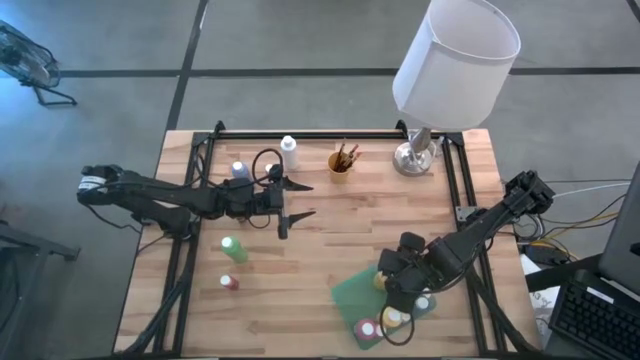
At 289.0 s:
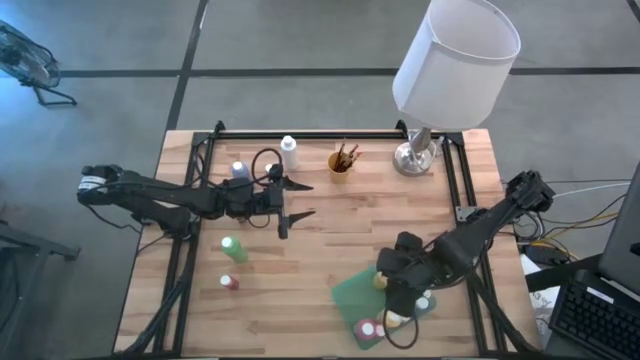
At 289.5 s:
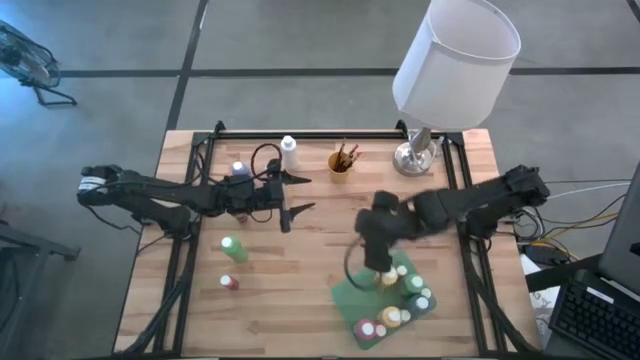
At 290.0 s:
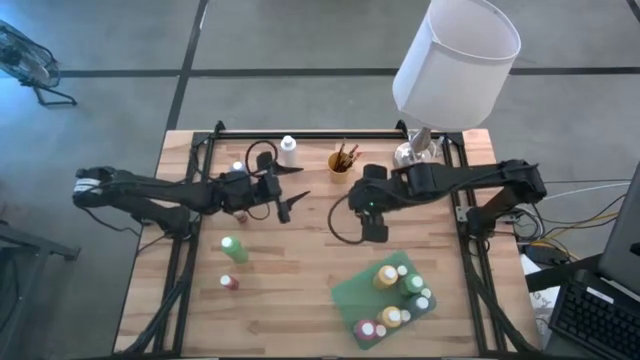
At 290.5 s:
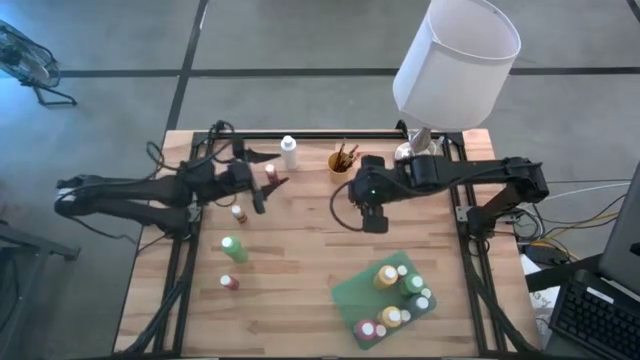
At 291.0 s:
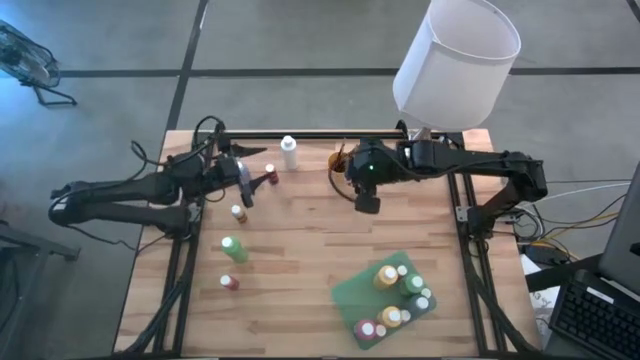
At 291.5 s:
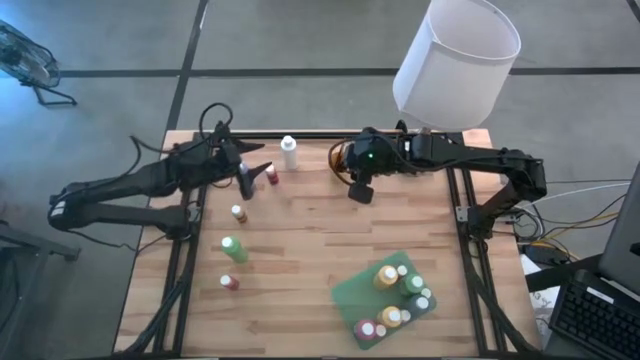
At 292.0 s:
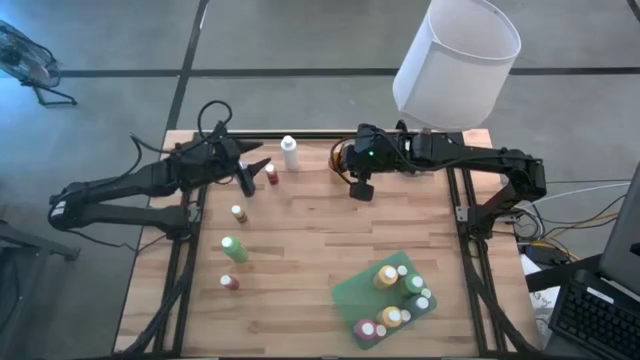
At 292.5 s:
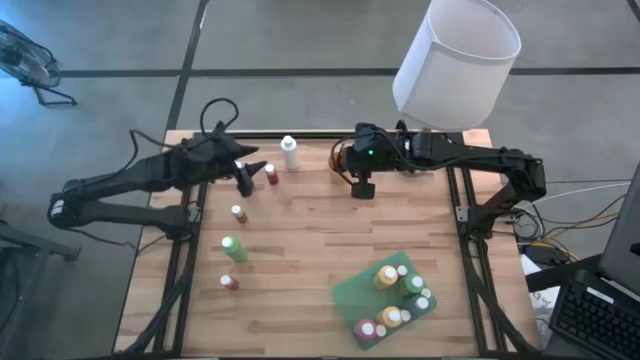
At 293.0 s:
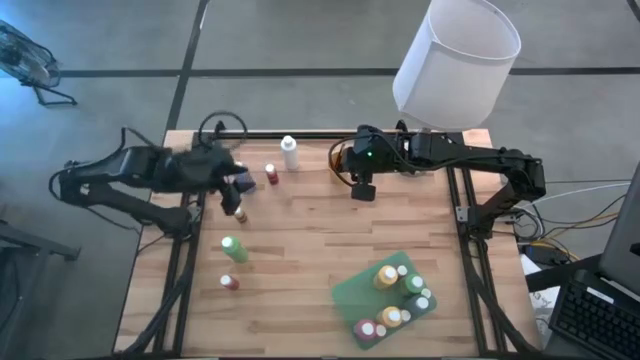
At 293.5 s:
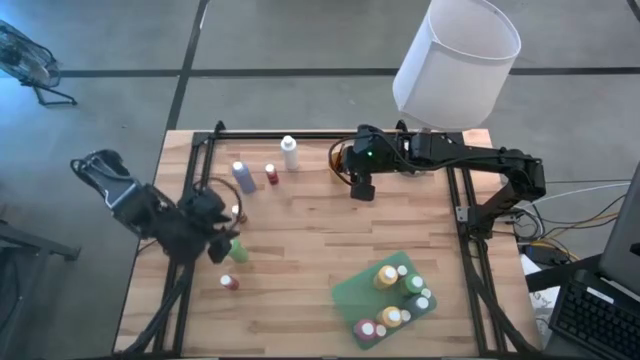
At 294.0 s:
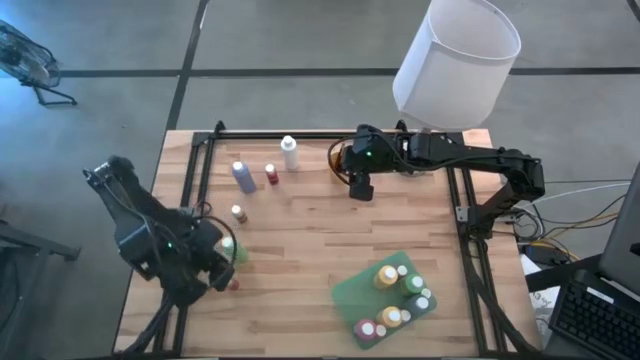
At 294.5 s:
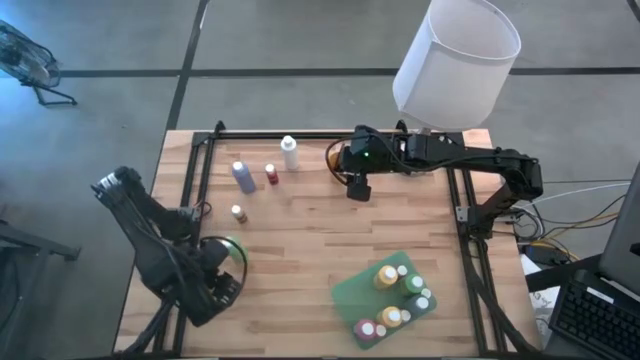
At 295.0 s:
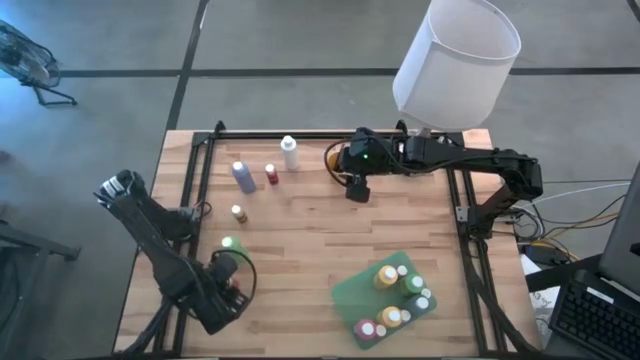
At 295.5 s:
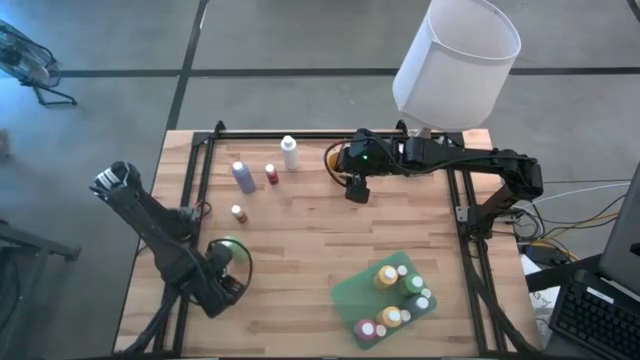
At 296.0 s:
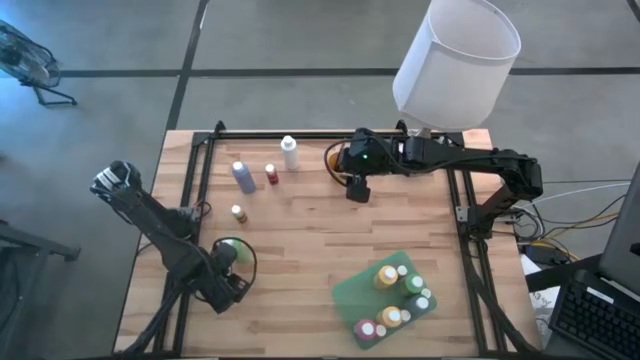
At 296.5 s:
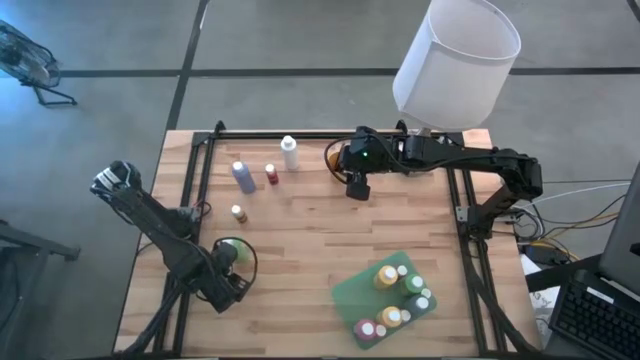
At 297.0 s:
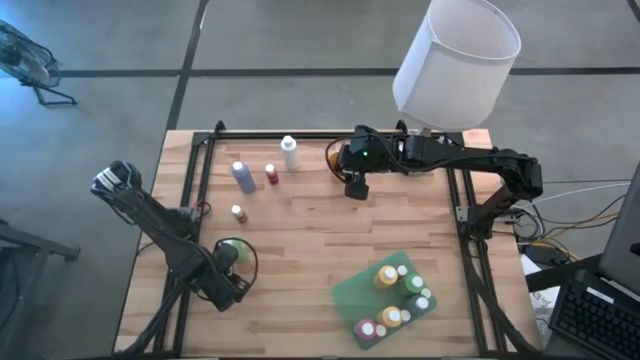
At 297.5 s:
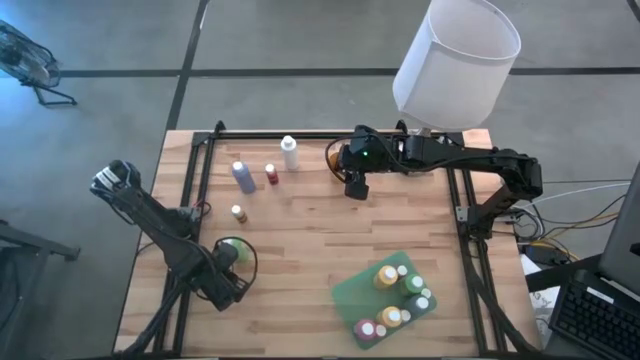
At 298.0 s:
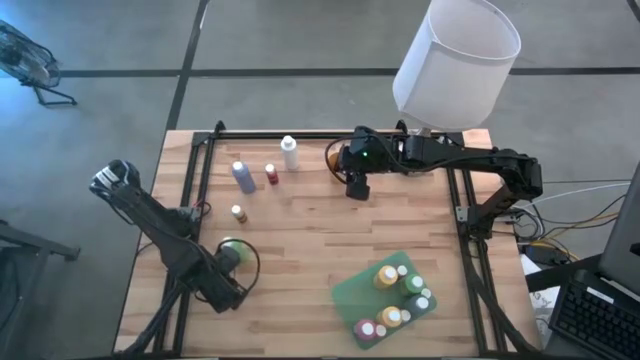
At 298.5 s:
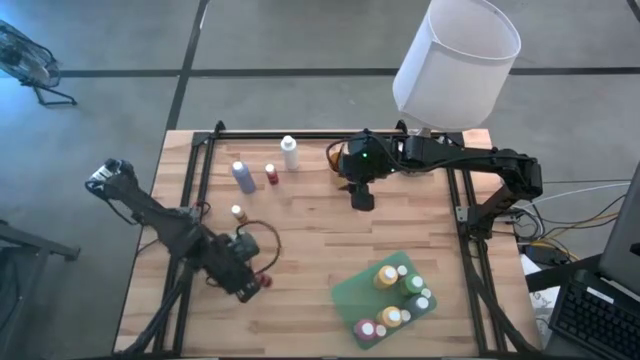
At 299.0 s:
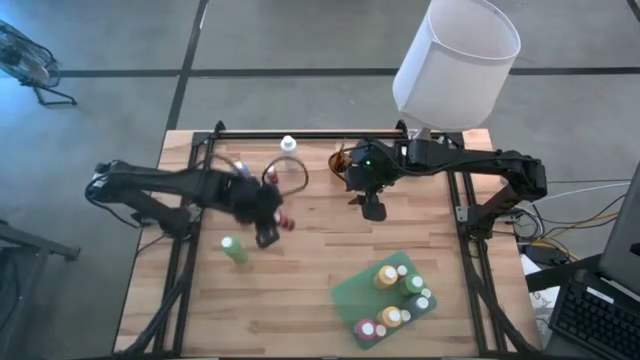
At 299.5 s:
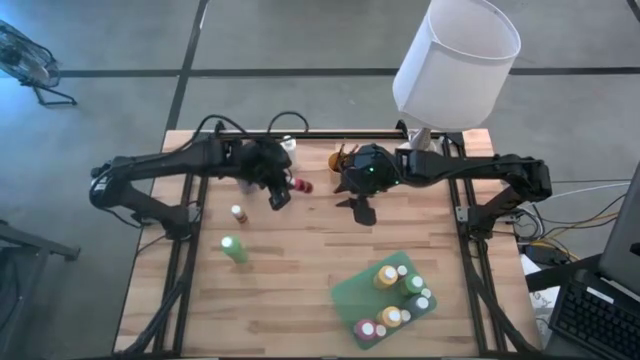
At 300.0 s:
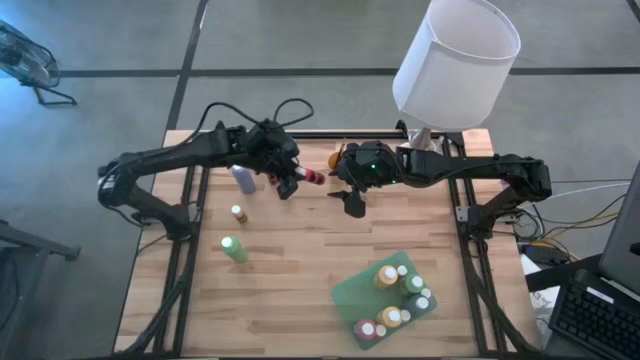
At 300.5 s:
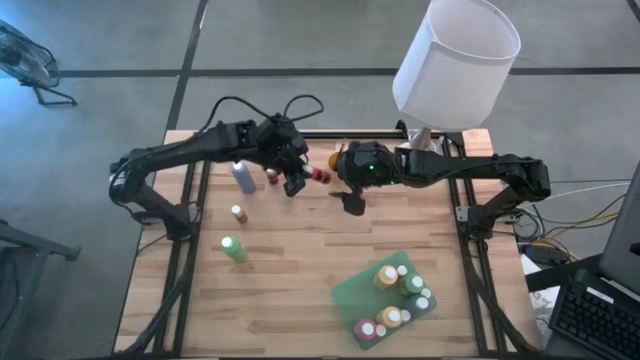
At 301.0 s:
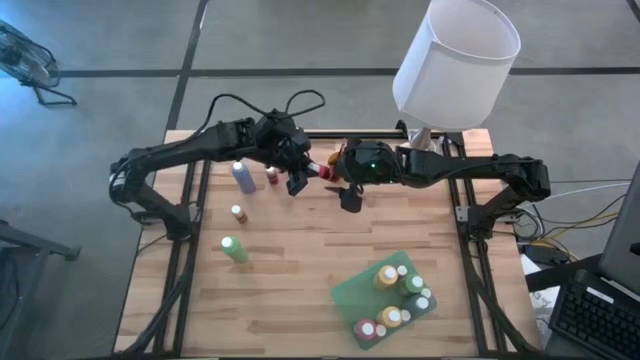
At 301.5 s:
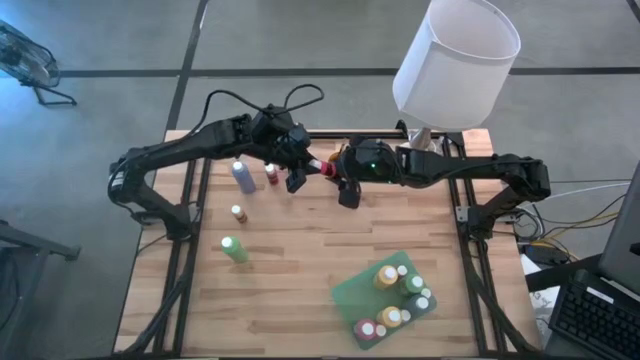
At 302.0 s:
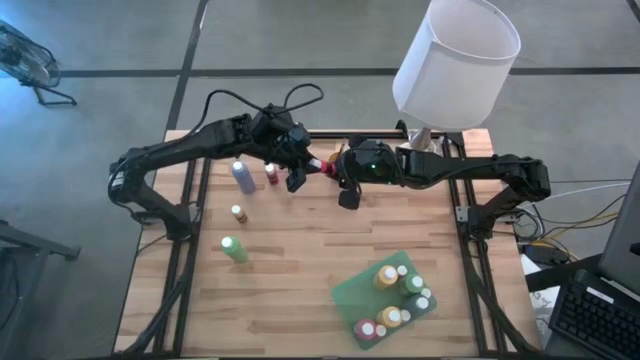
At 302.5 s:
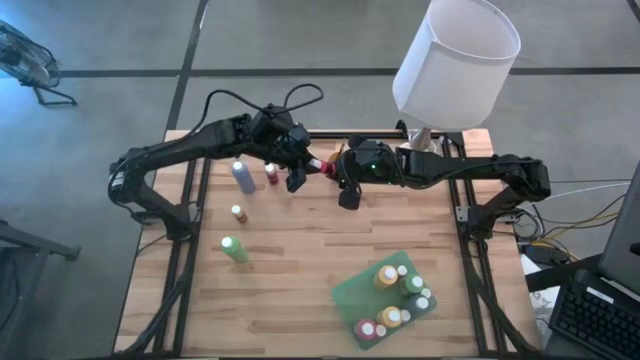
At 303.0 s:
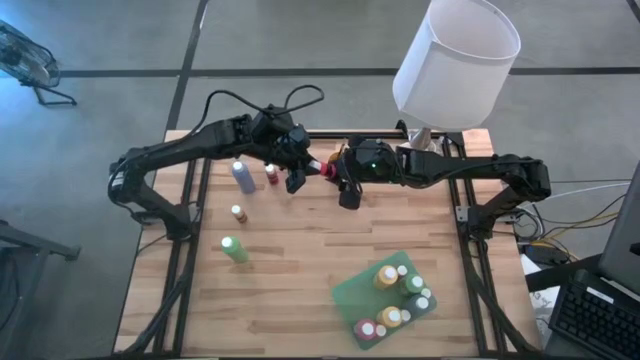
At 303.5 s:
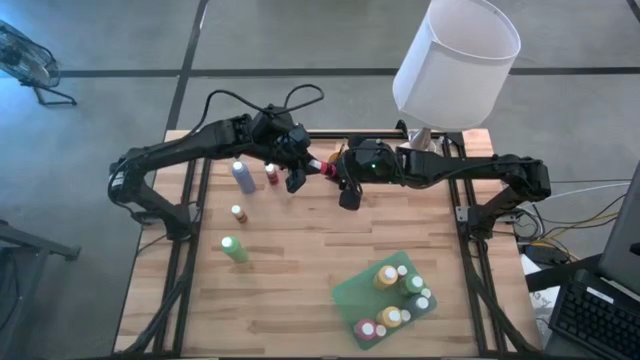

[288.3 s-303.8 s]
Task: Pick & Place Paint Supplies
Put the red paint bottle into the green bin

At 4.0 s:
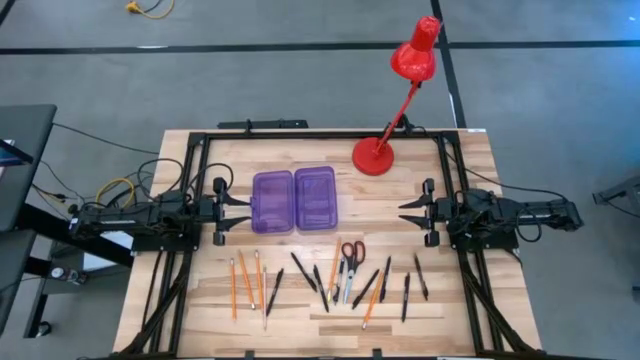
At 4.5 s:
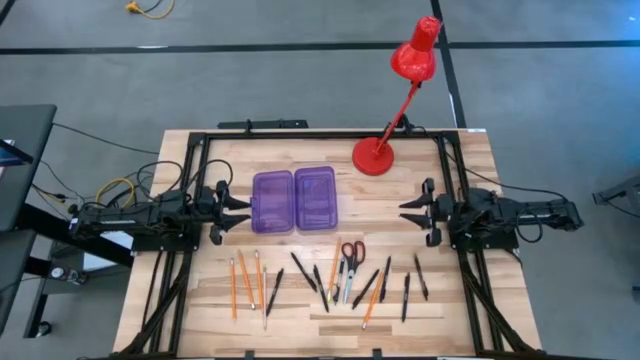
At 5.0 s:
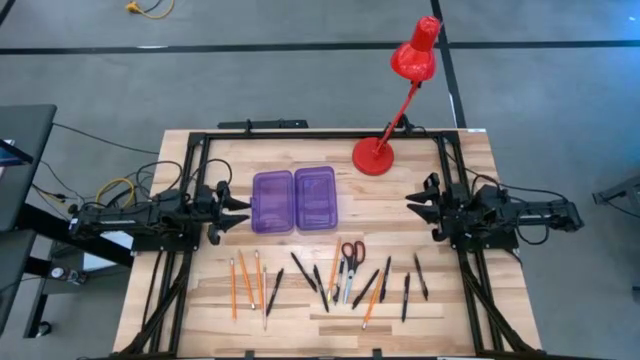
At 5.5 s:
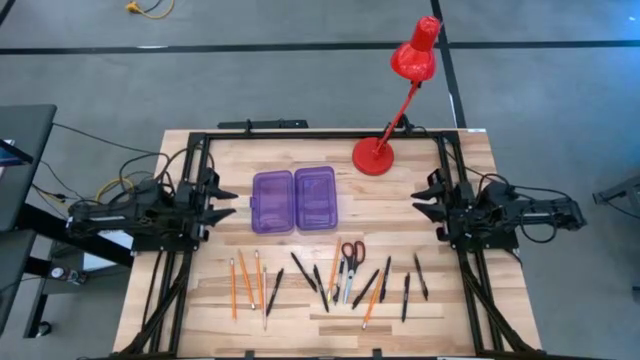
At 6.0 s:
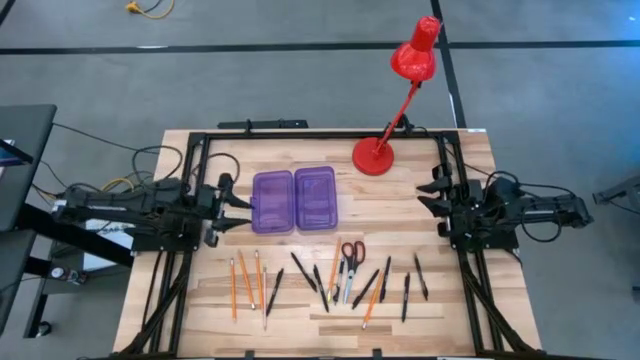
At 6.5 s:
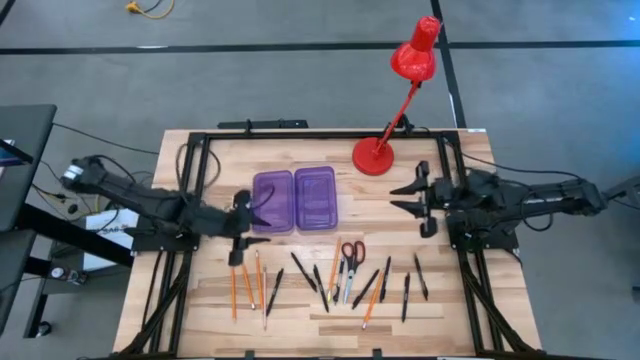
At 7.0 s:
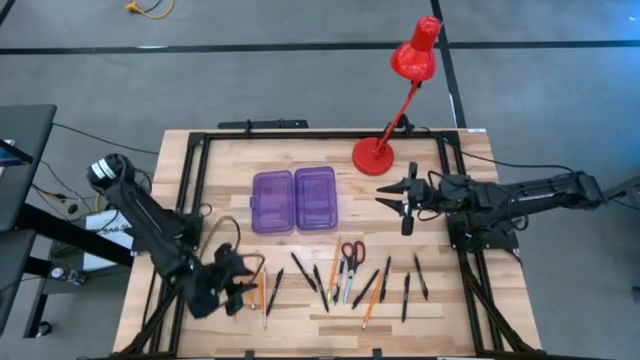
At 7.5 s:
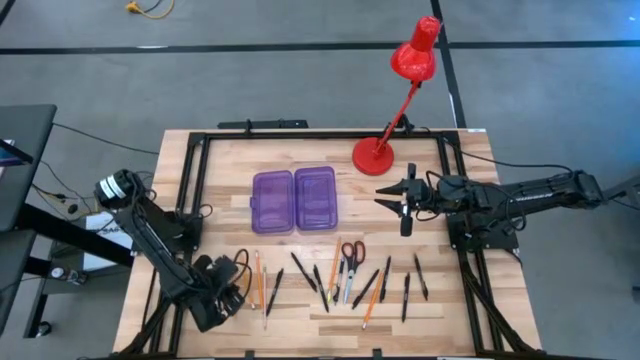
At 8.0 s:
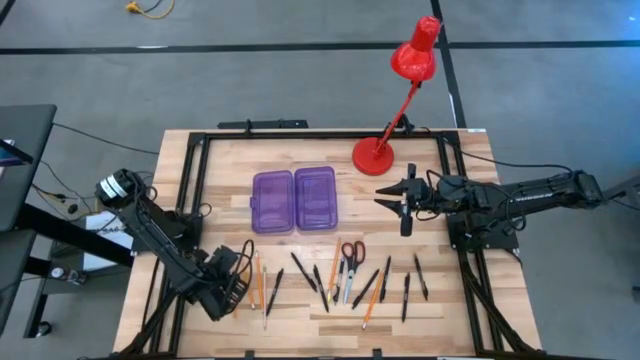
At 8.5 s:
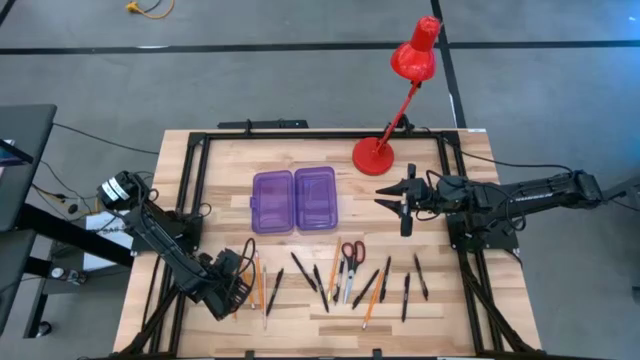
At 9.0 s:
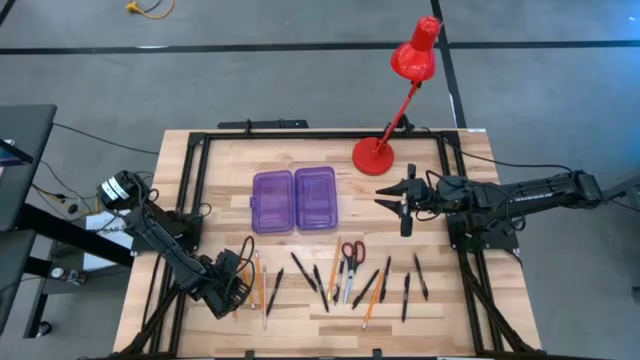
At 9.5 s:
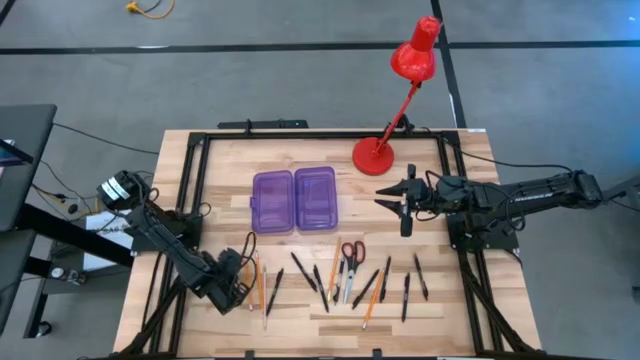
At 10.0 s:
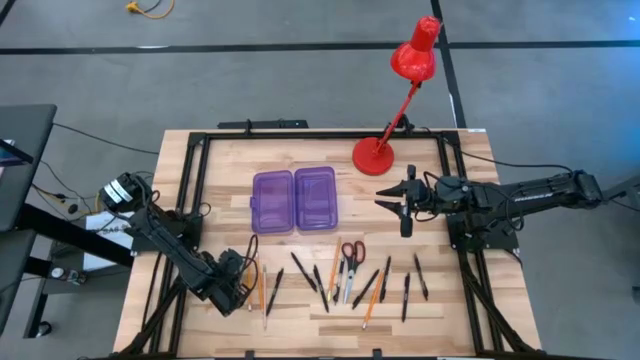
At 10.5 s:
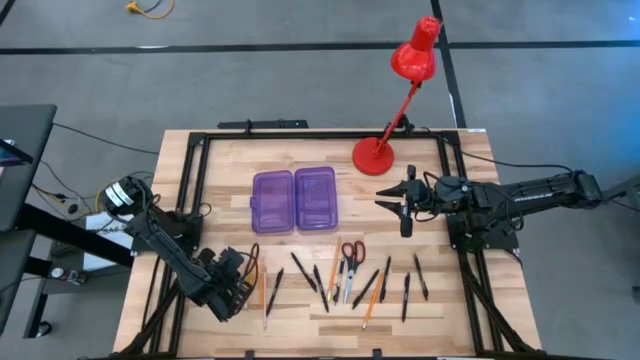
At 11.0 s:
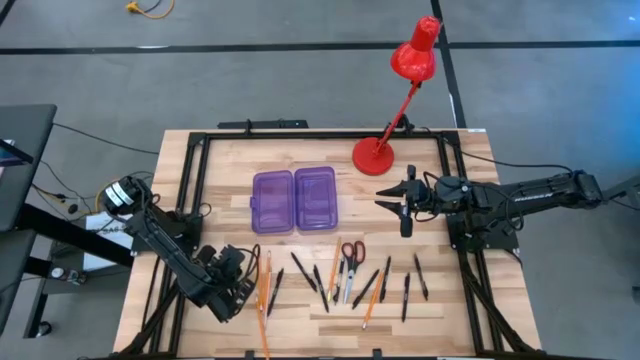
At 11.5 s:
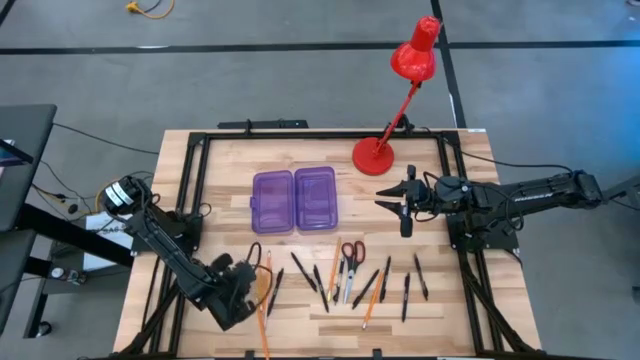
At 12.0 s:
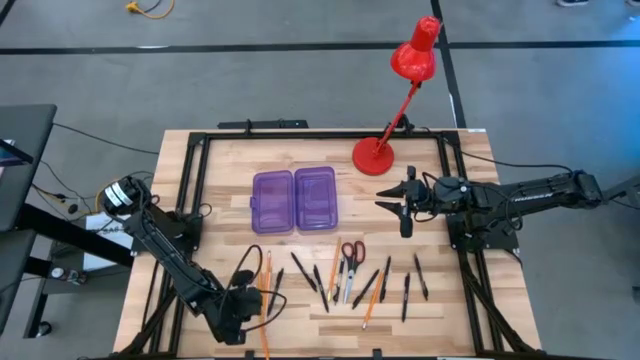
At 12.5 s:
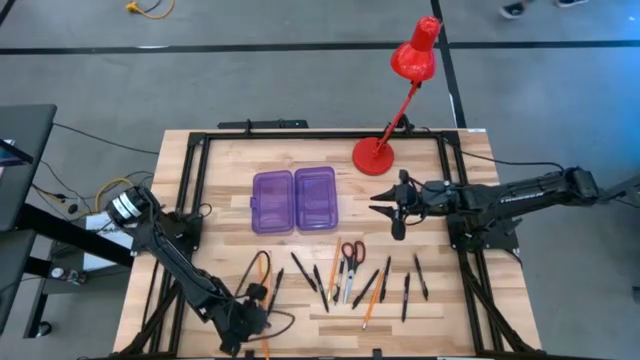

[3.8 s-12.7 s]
Task: Pick & place school supplies into a supply box
Put the orange pencil into the violet supply box
